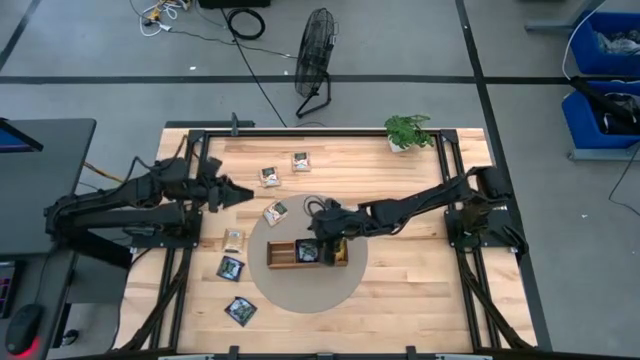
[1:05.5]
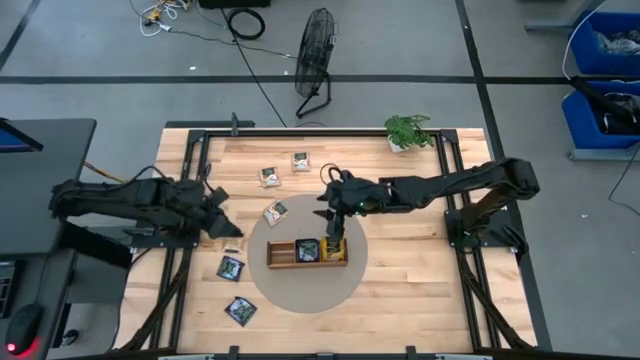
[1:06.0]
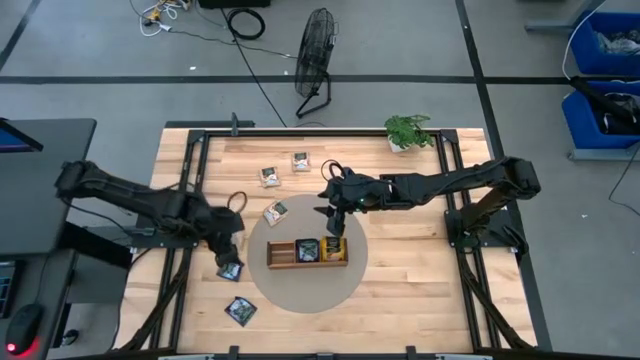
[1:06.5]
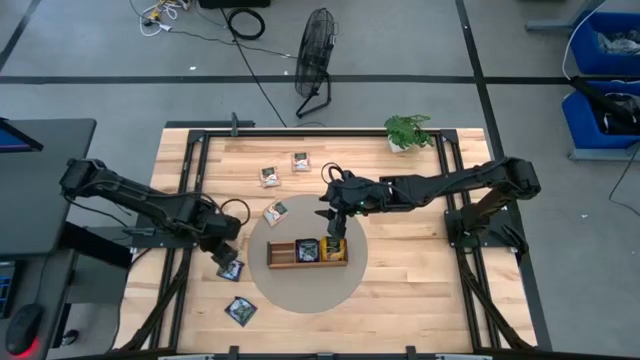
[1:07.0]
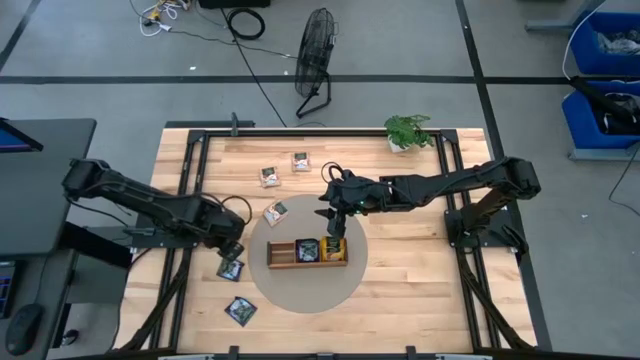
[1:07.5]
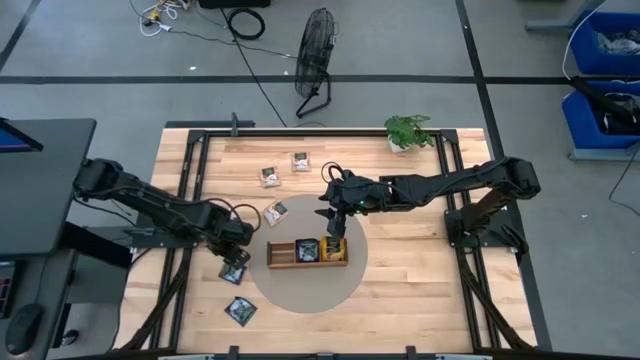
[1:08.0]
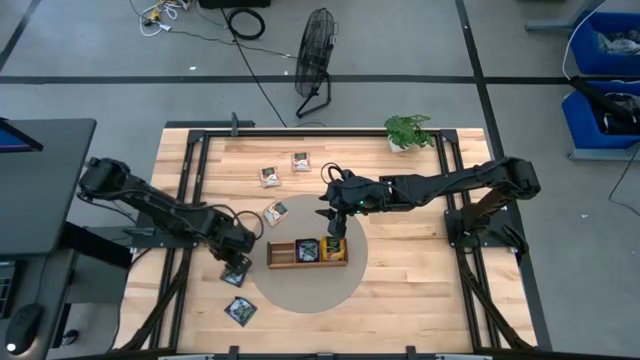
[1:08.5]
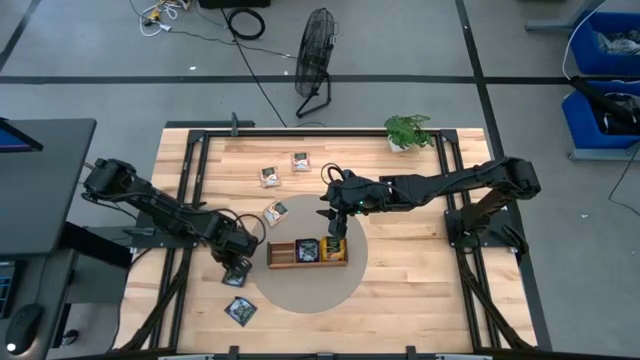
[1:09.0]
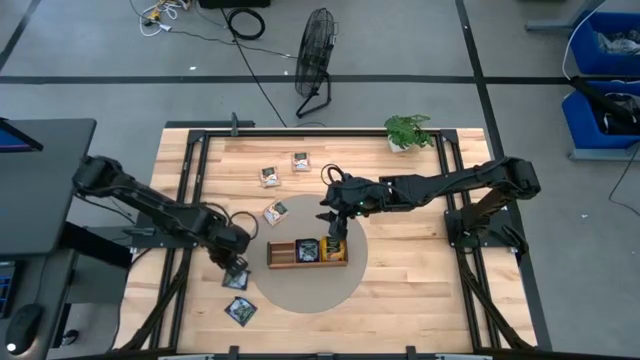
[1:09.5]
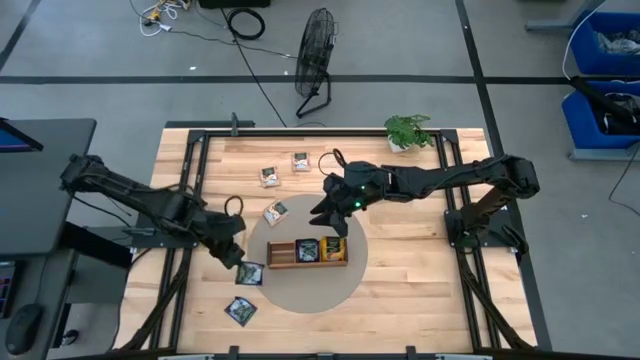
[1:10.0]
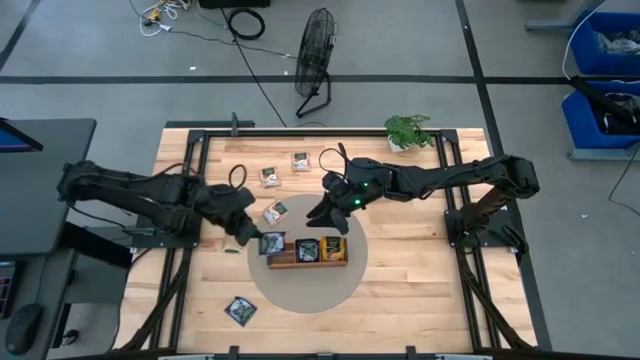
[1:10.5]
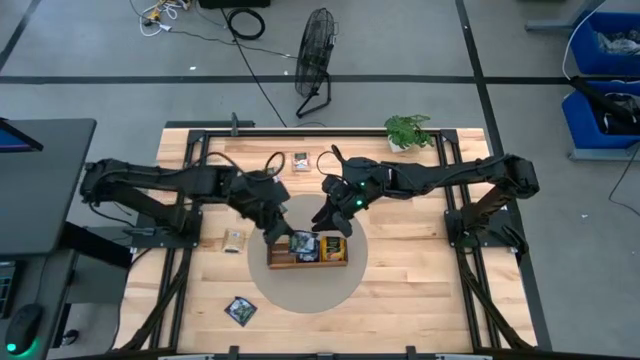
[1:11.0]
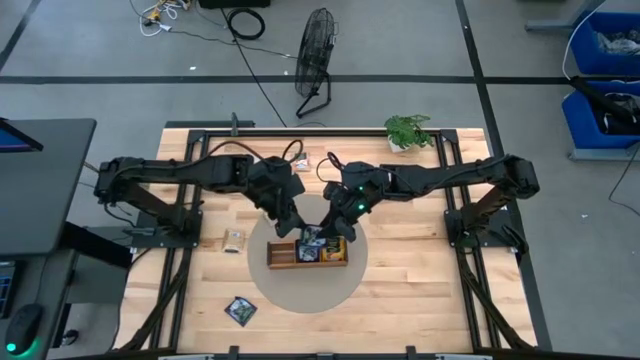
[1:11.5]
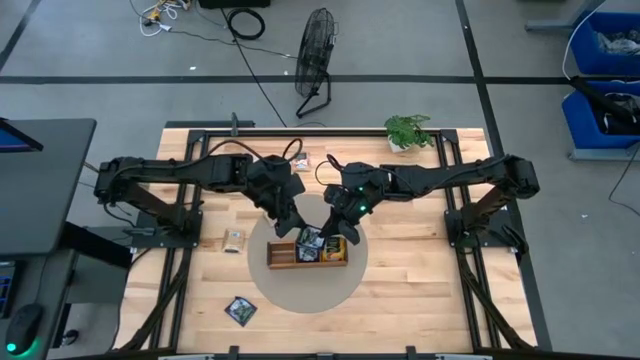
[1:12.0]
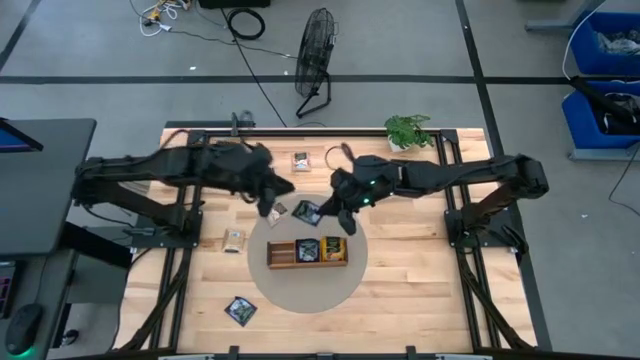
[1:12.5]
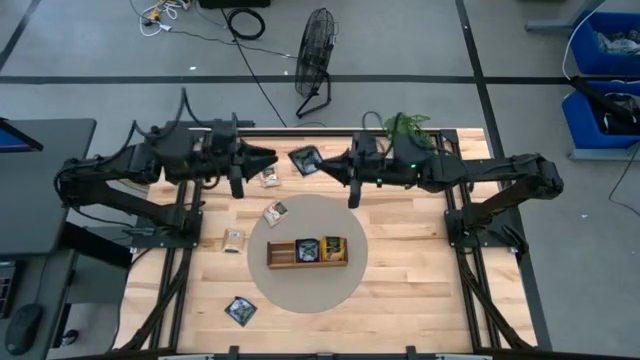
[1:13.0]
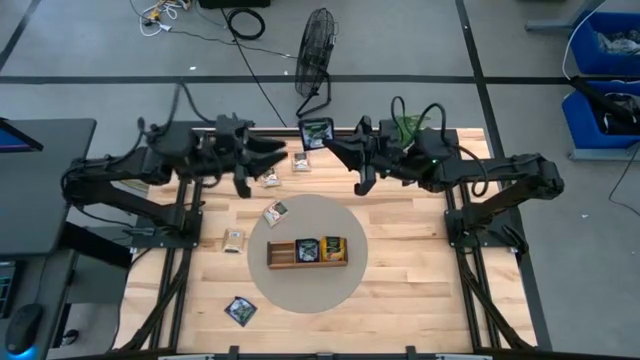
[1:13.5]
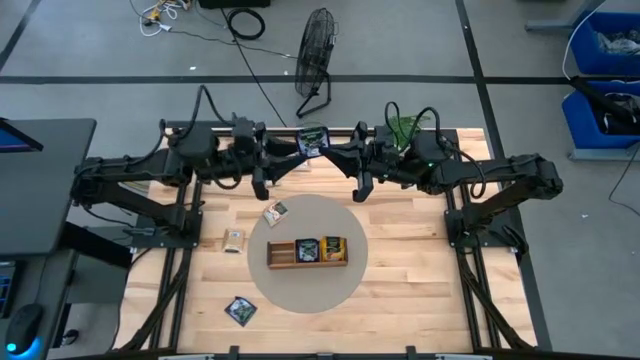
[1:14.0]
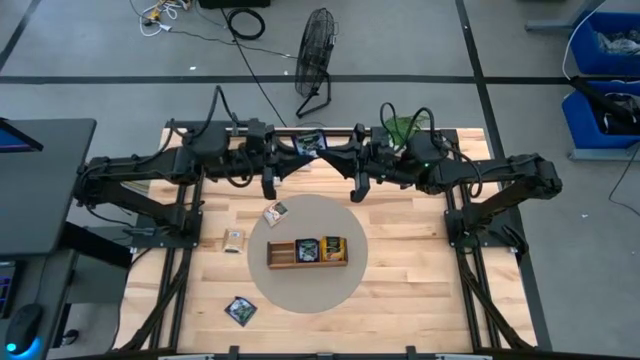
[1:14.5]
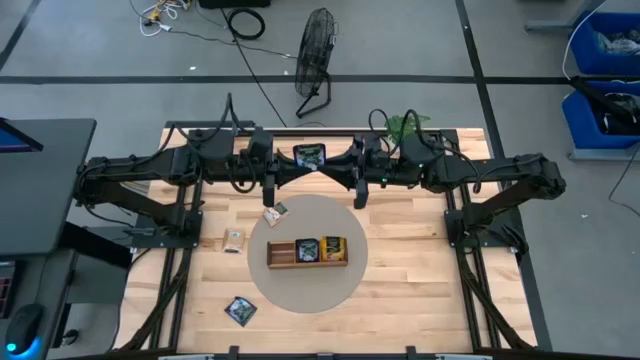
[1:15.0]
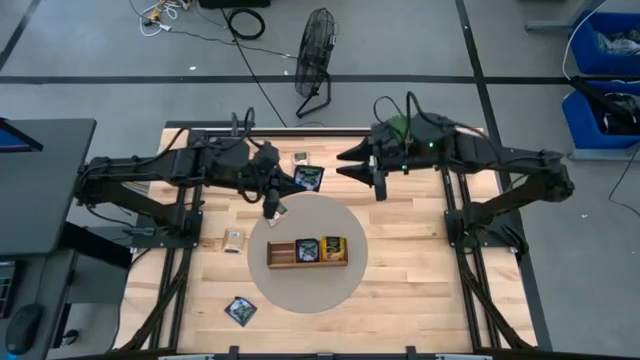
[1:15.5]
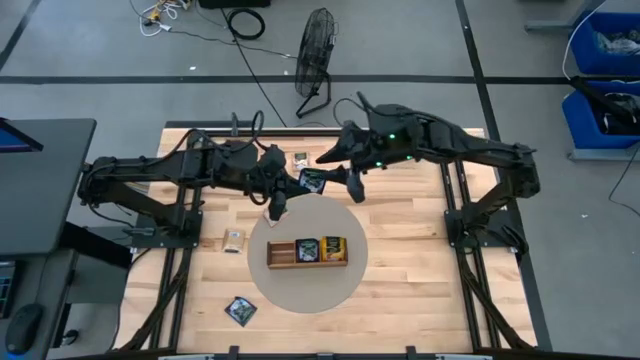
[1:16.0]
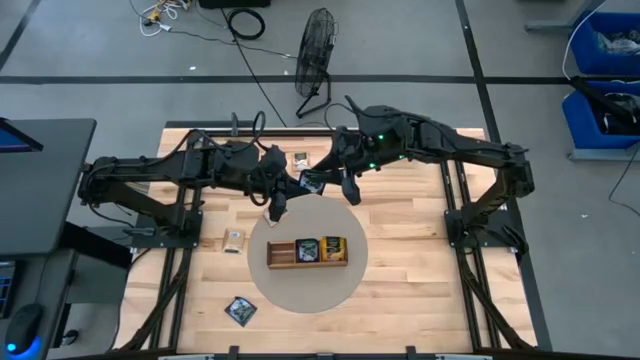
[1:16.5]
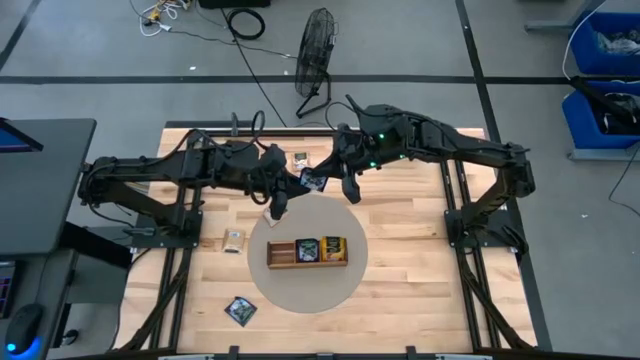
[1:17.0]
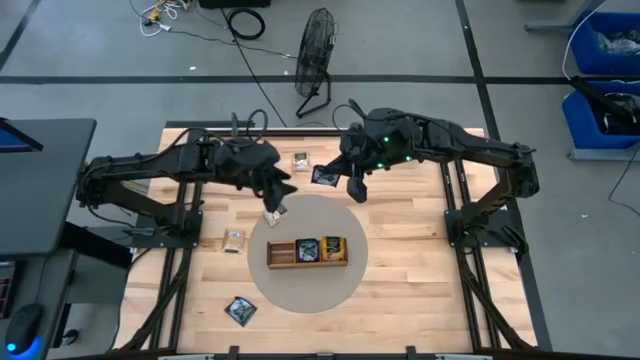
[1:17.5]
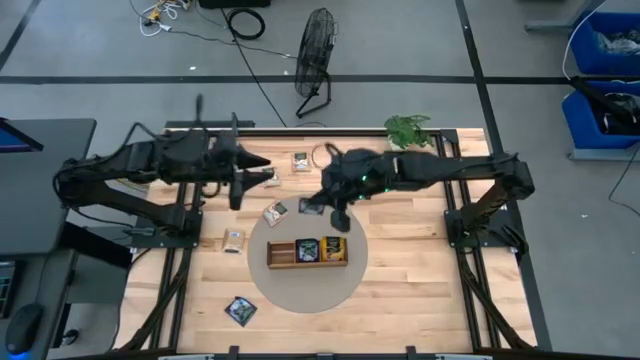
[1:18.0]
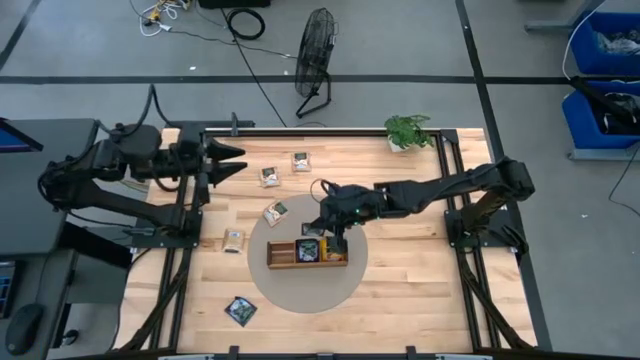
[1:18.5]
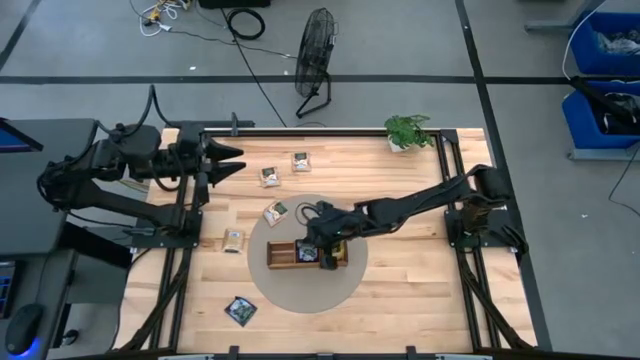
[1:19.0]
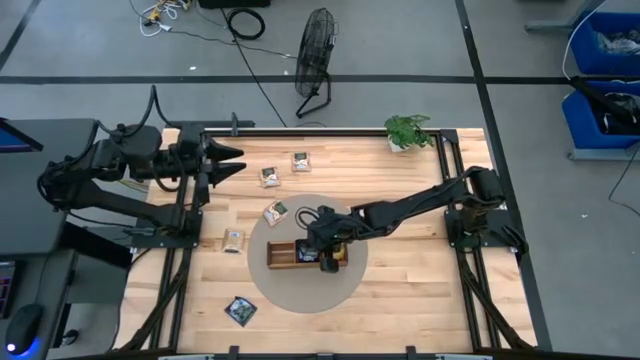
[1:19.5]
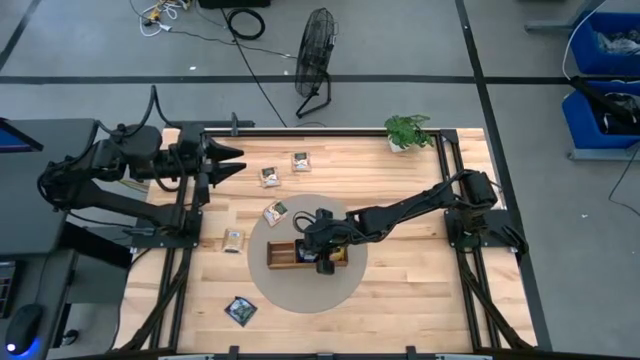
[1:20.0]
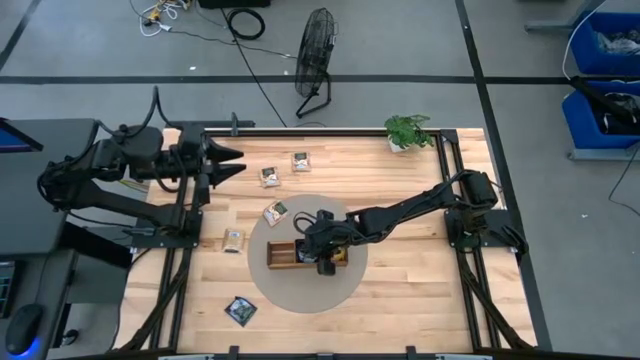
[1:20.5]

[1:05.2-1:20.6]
Task: Pick & Place Tea
Put the violet tea bag into the middle section of the wooden organizer

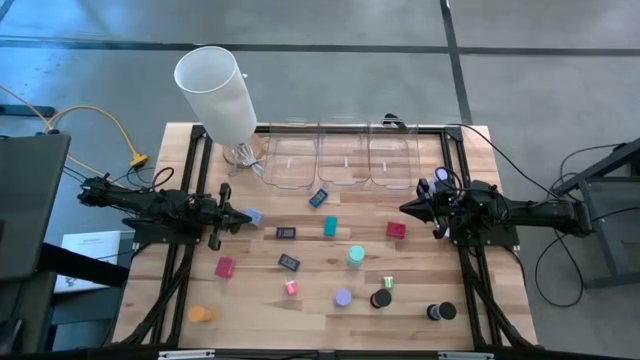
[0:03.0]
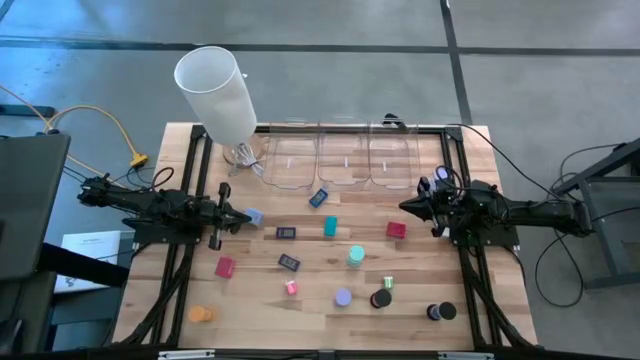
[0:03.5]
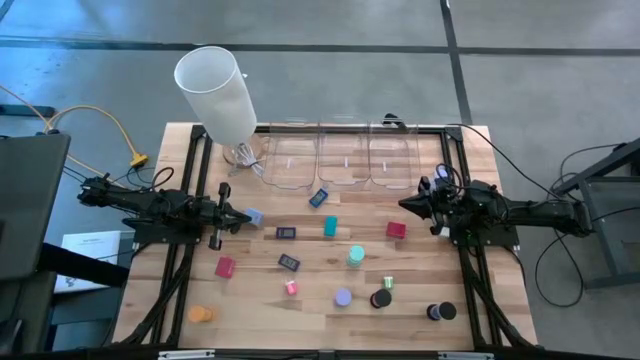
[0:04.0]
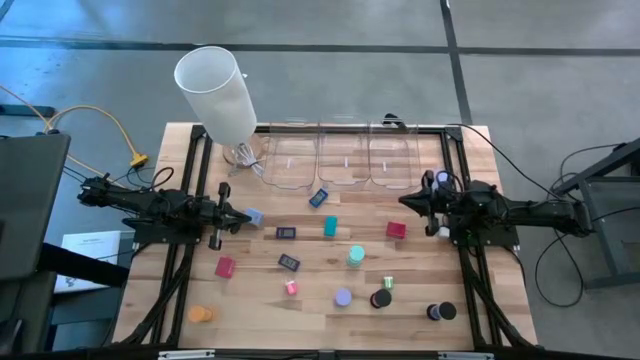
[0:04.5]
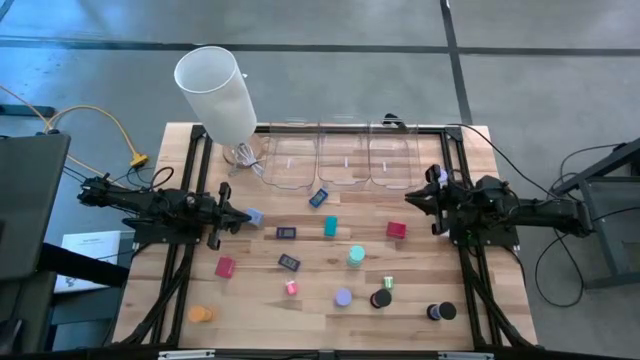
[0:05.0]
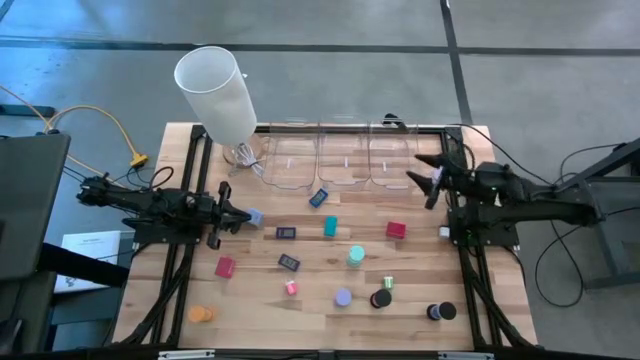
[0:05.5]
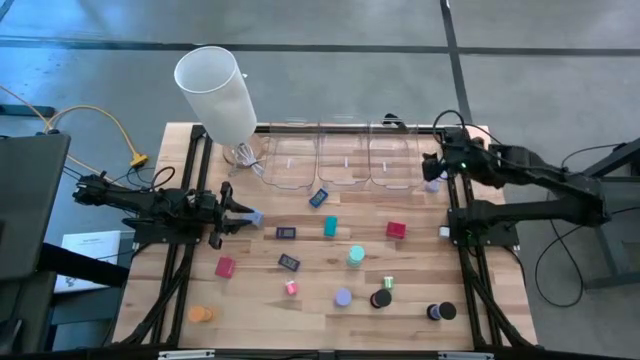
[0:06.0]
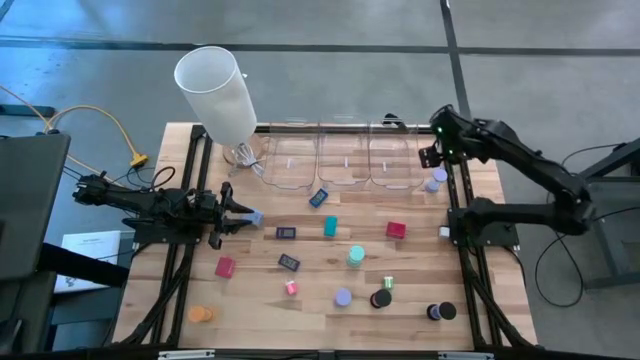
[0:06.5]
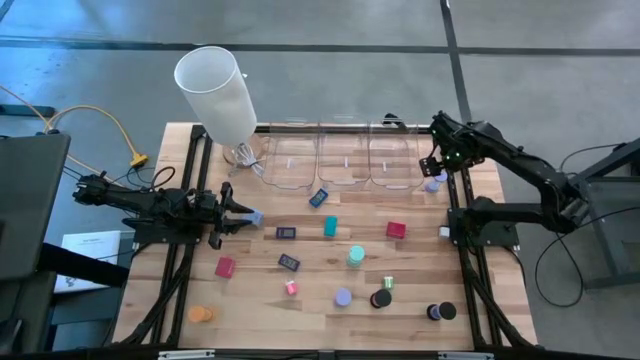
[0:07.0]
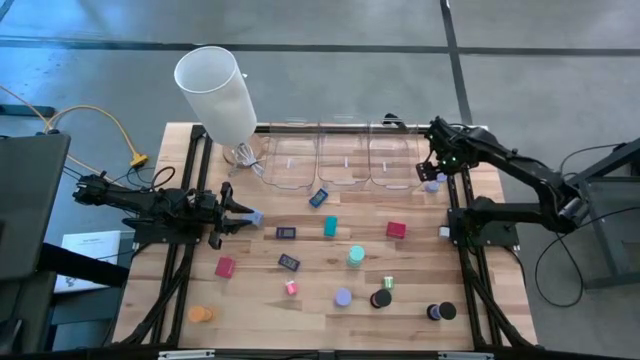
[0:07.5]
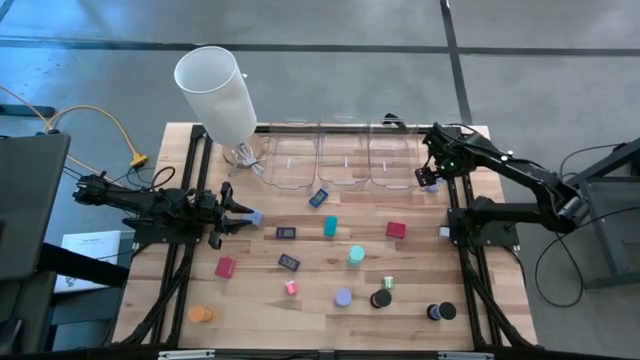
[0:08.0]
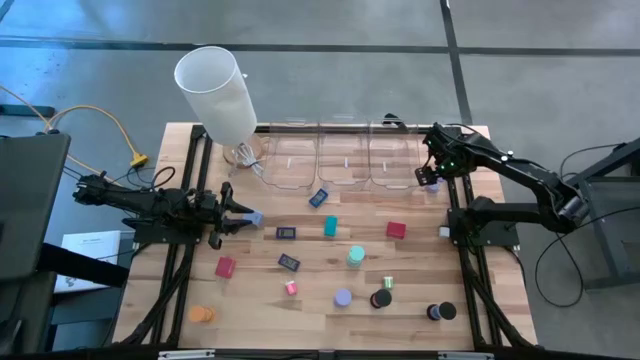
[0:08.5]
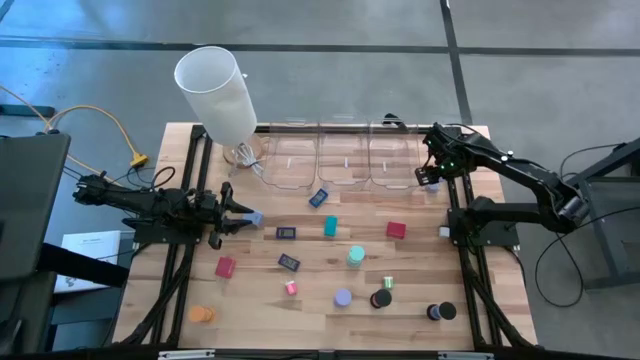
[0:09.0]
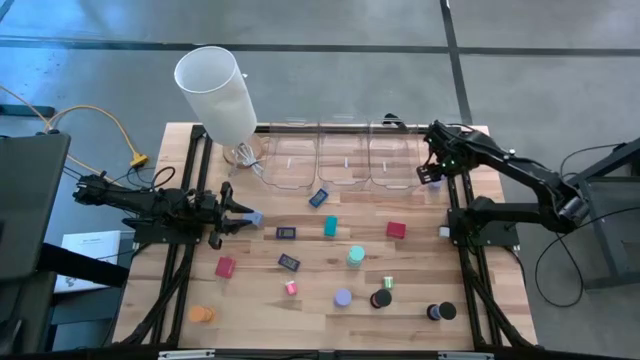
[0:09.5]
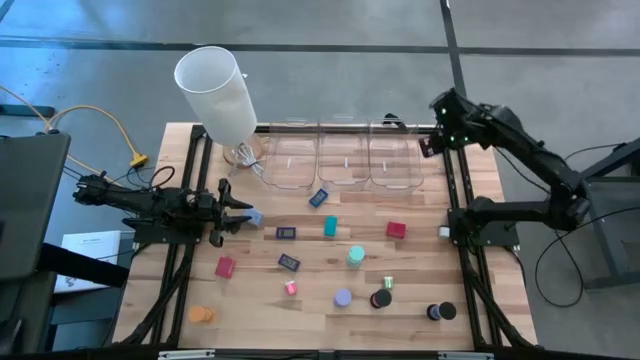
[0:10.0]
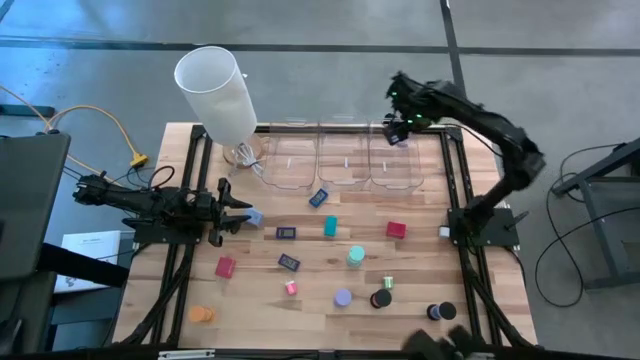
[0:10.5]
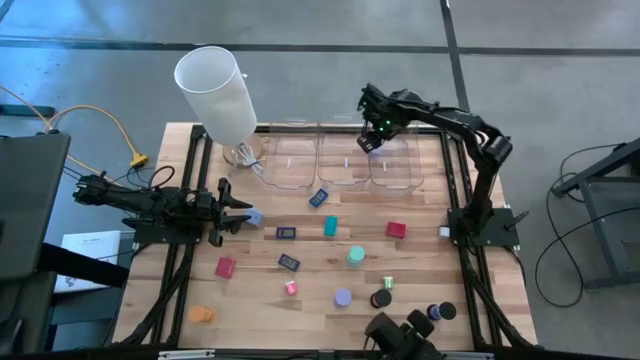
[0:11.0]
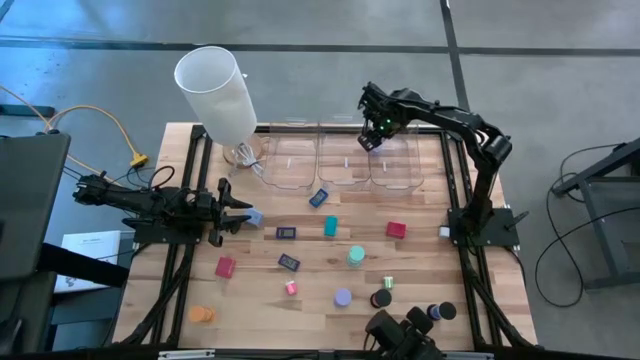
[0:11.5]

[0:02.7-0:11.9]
Task: Pick & Place Office items
Put the top violet hourglass into the right transparent bin
